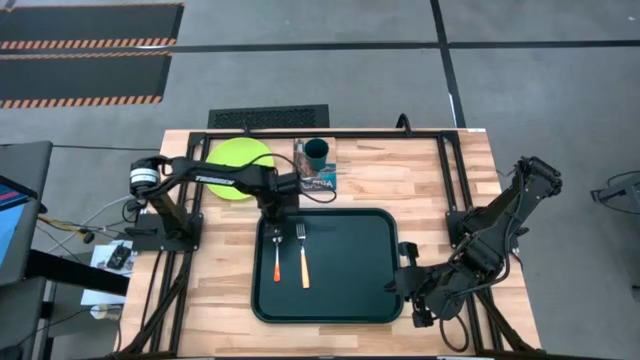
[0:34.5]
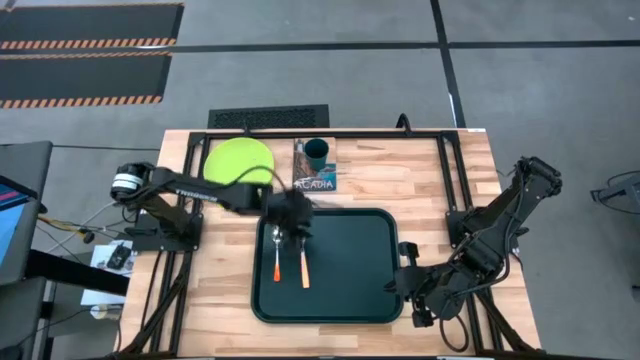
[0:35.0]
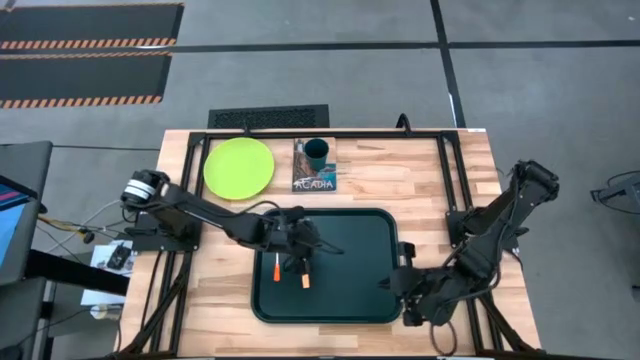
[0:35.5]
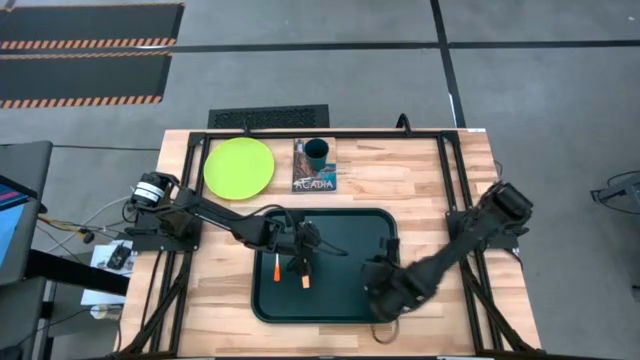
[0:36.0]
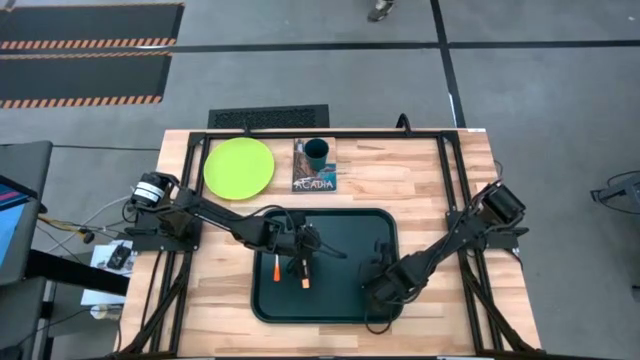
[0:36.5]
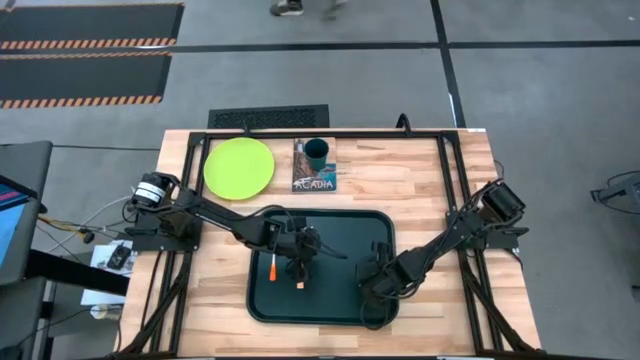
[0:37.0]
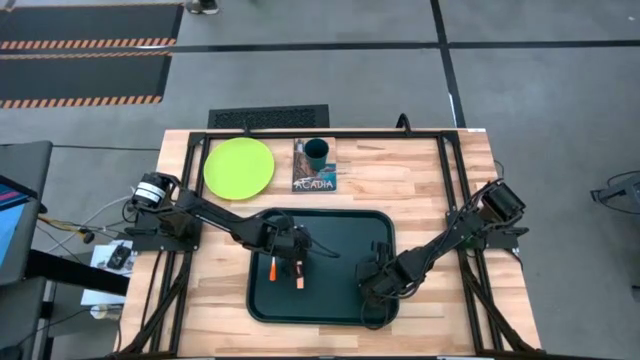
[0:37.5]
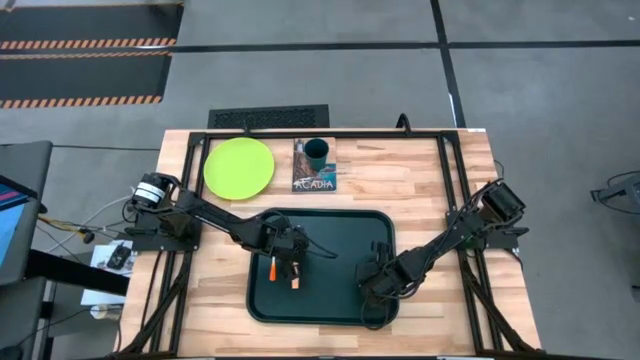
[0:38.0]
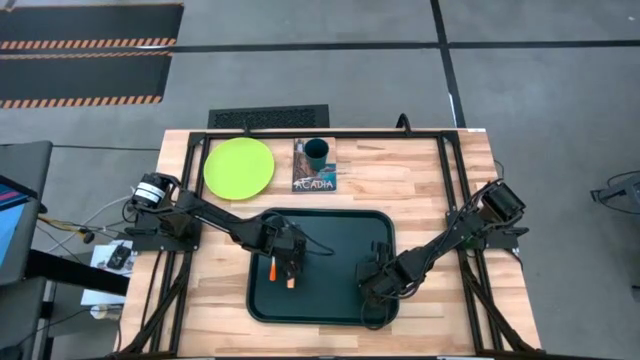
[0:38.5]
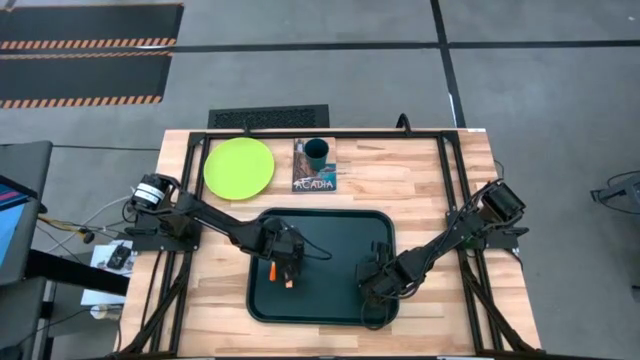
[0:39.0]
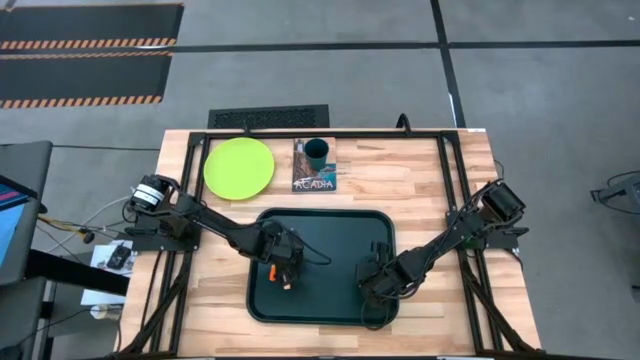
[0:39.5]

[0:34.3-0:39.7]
Task: Pick and place plate/cup/fork/spoon on tray
Adjust the orange fork on the black tray

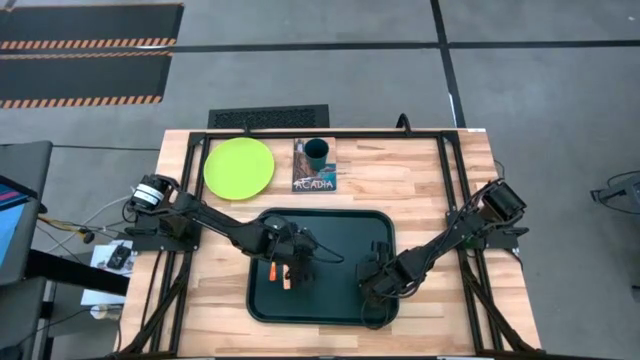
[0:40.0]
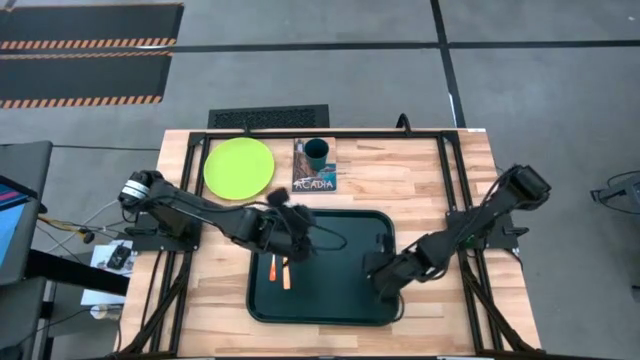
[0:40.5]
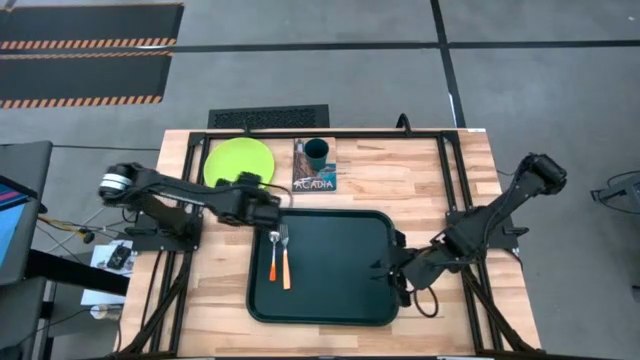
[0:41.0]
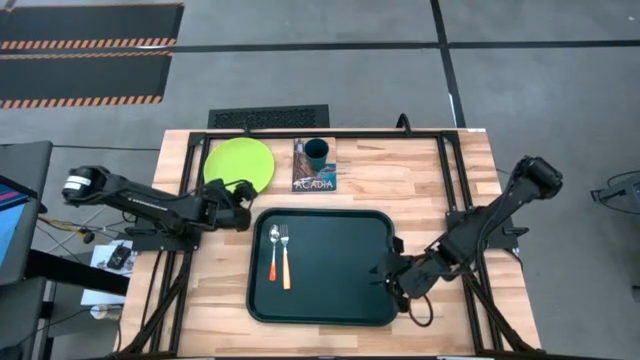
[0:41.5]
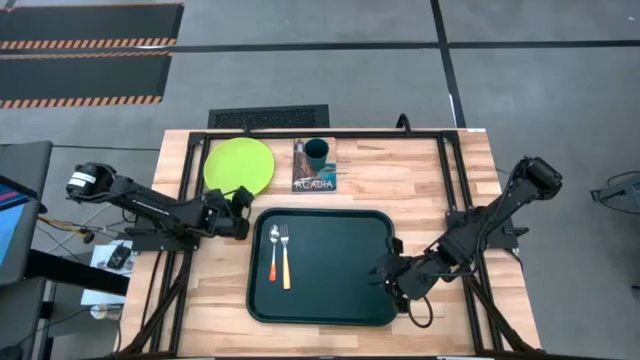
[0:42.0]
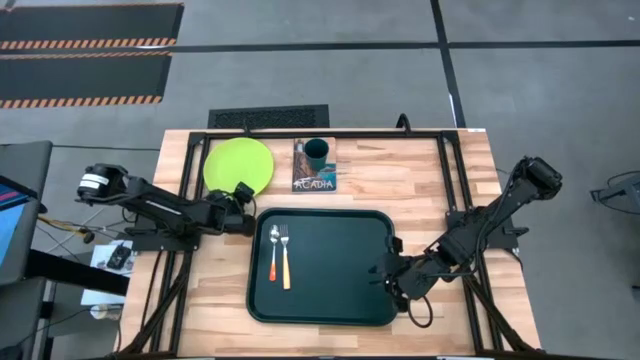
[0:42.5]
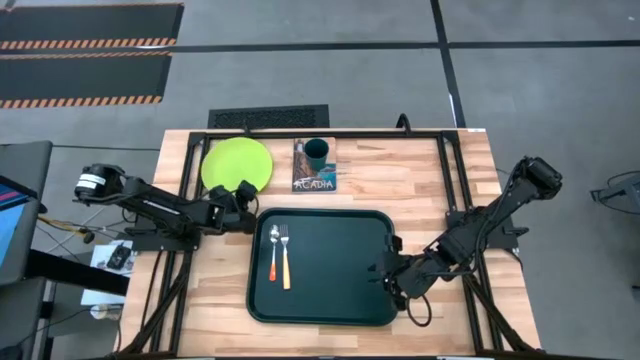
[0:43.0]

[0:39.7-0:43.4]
Put the green plate on the black tray to the right of the orange fork

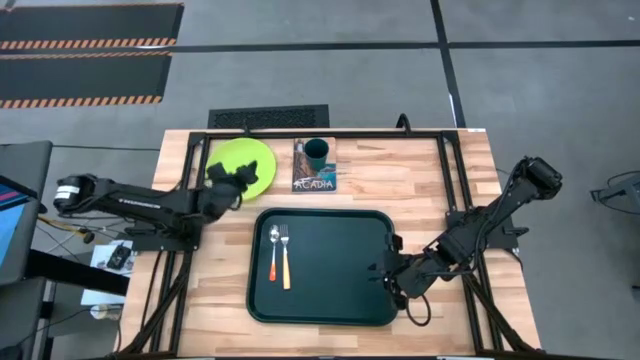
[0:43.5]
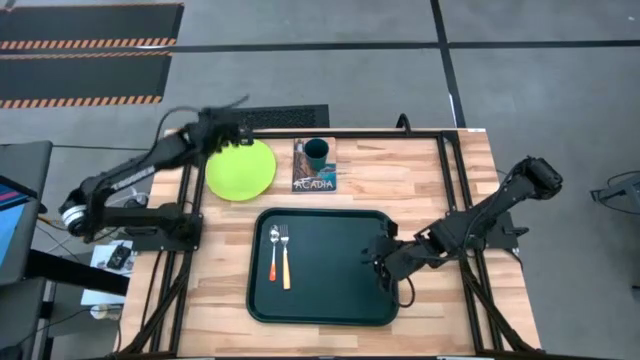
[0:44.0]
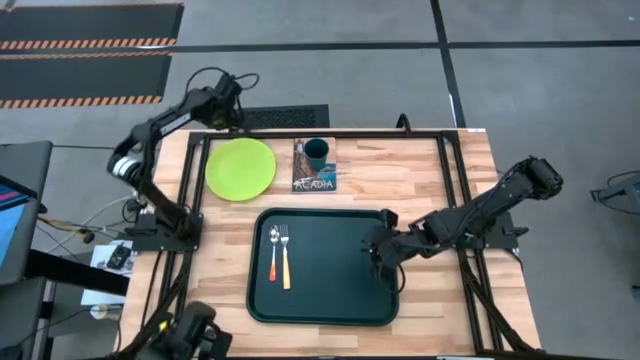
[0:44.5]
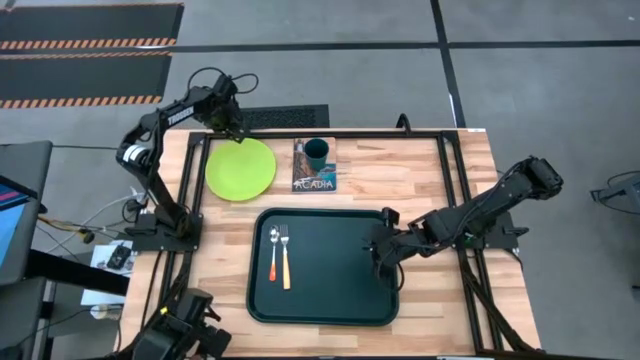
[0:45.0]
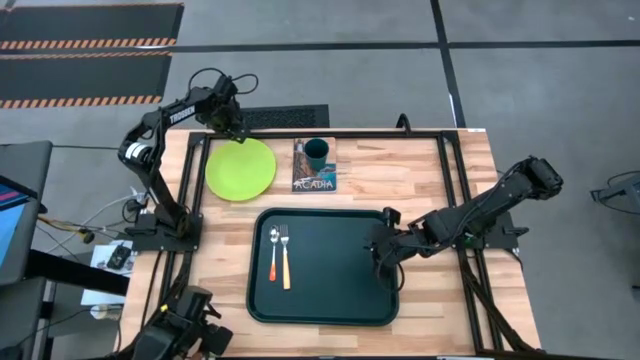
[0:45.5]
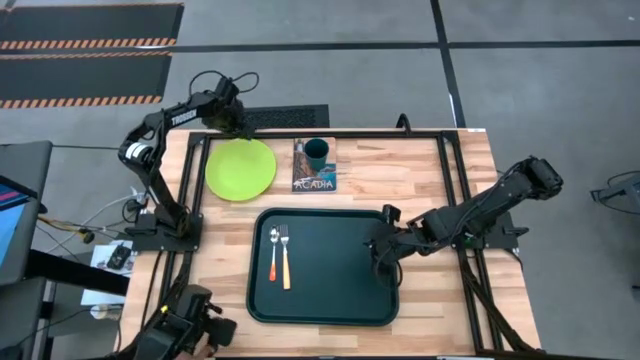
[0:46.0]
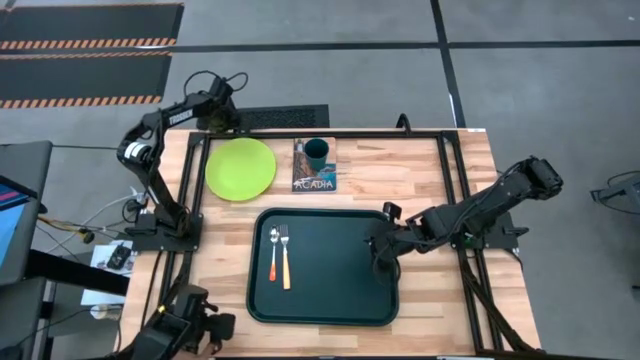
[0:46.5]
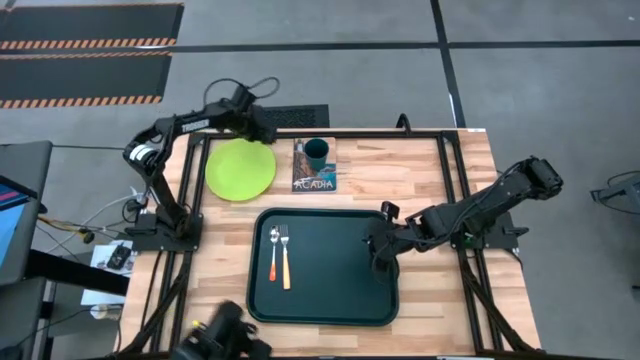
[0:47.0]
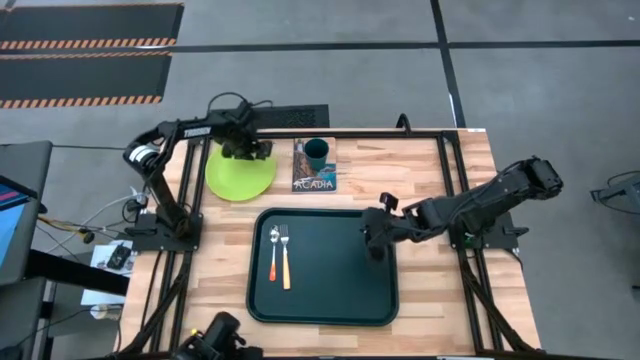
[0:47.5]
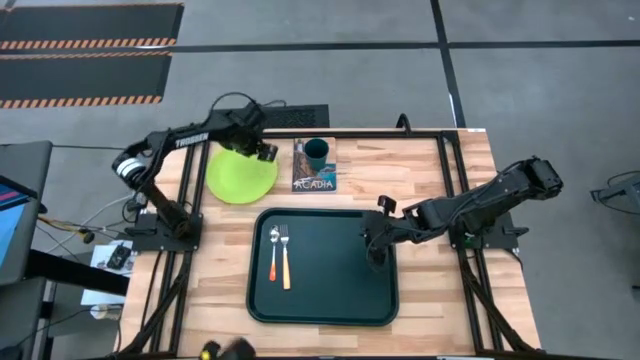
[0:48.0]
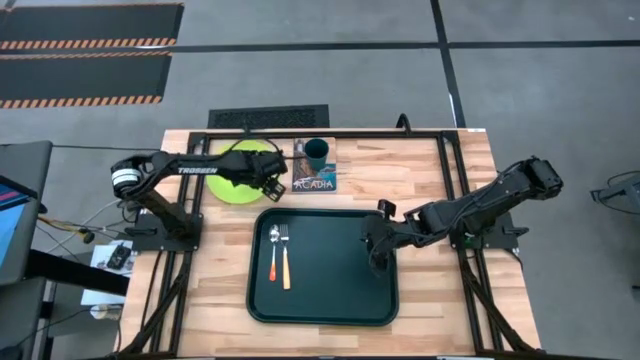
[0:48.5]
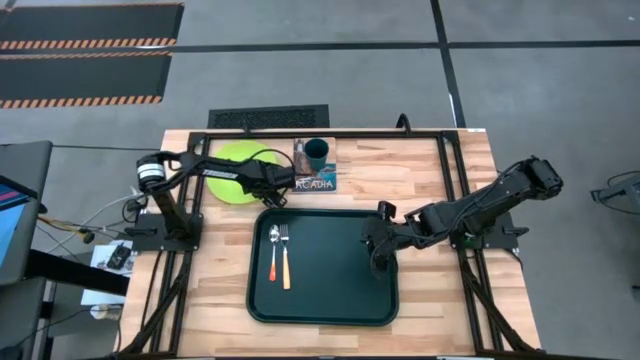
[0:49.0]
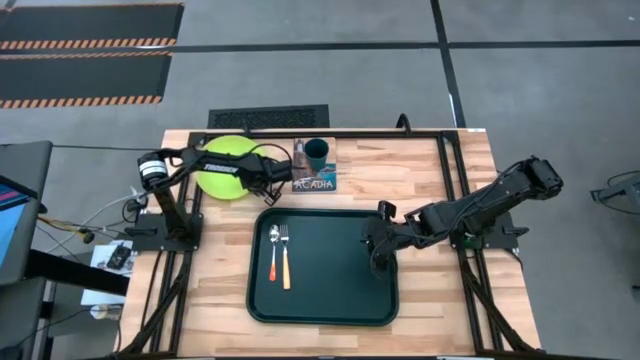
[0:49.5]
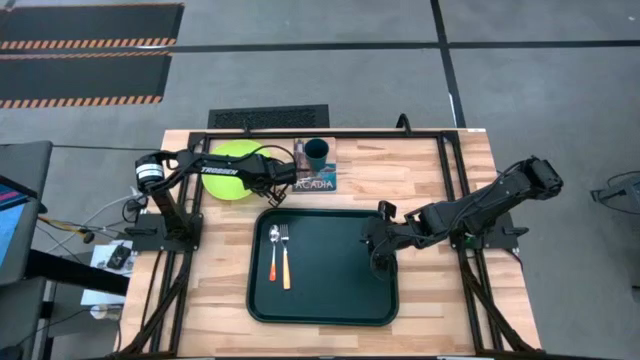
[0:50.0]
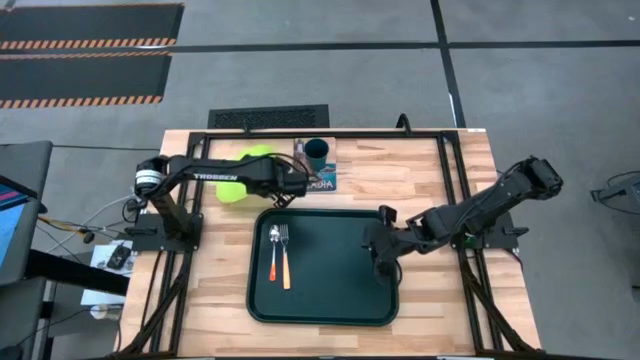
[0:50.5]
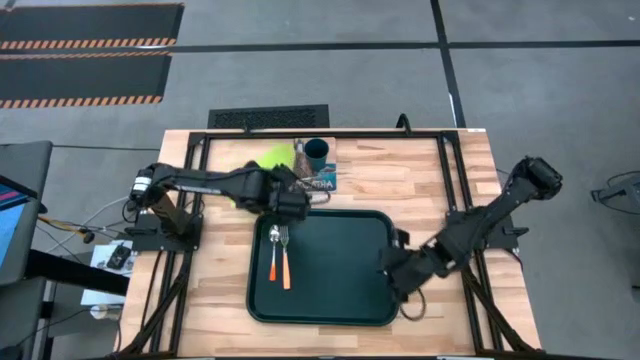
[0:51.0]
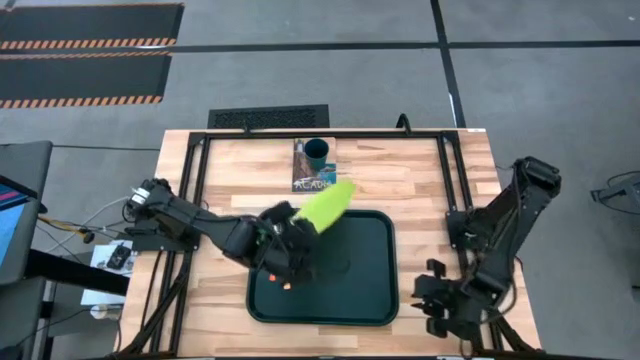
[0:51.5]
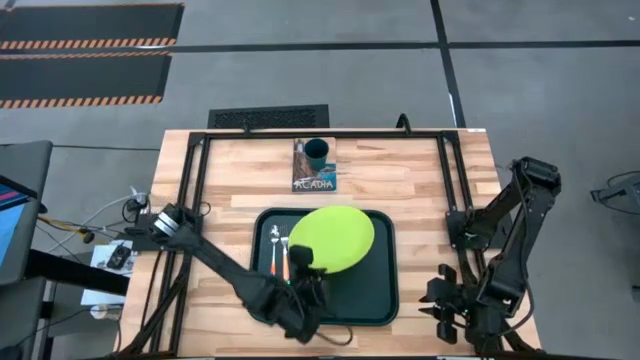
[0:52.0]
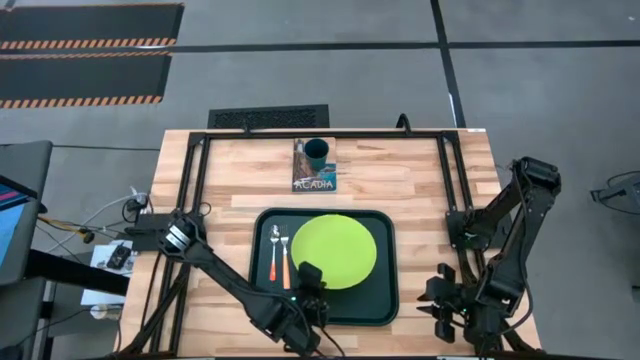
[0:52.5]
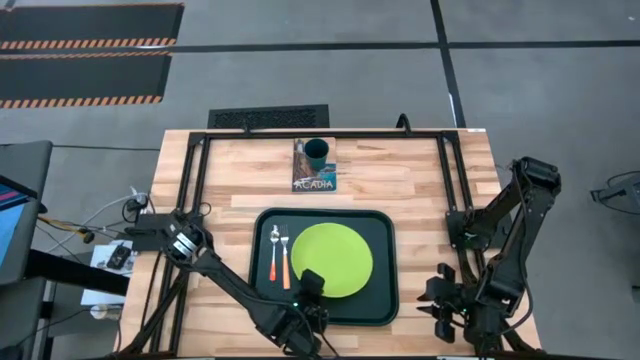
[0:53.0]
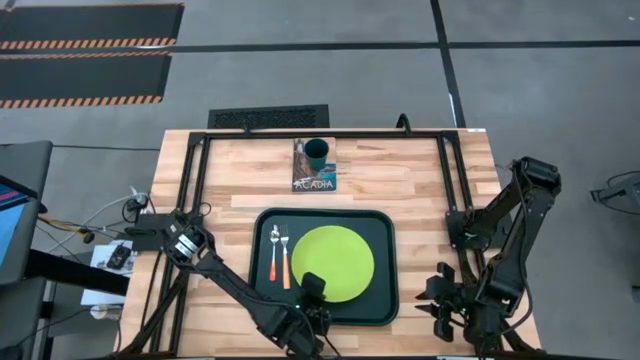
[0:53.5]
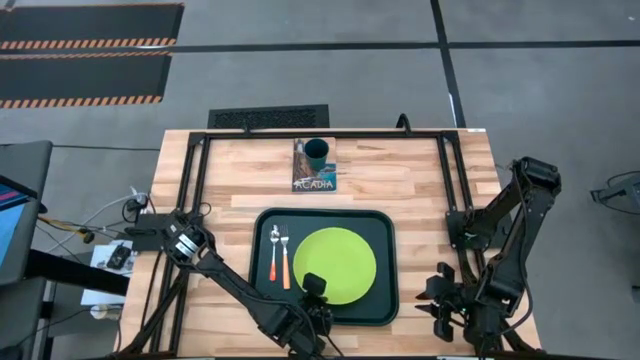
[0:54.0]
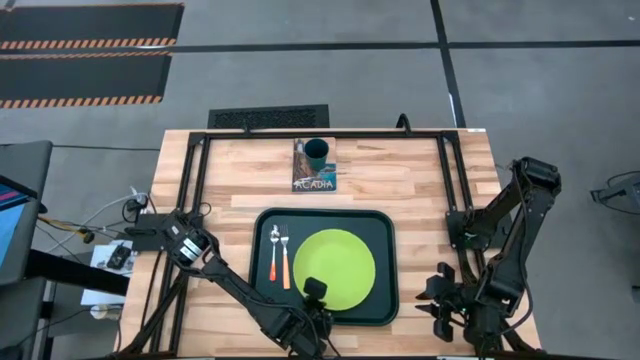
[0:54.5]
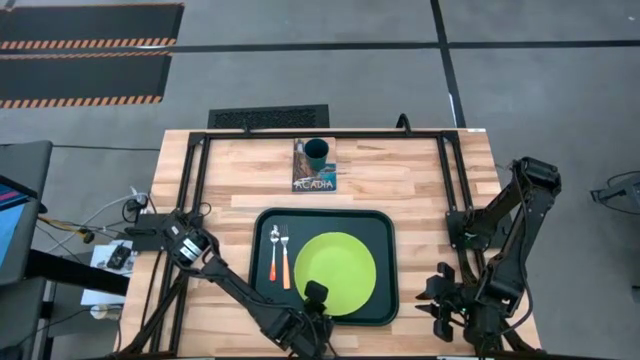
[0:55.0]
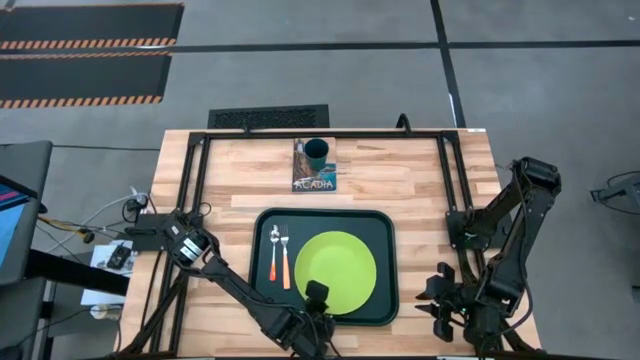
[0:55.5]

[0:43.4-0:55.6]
Put the green plate on the black tray to the right of the orange fork
